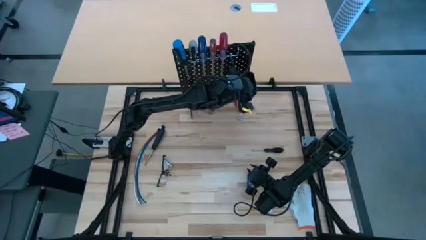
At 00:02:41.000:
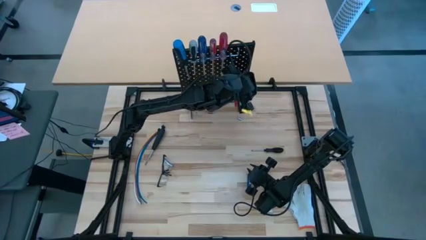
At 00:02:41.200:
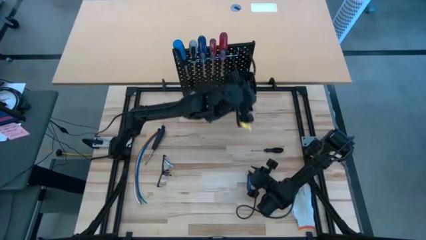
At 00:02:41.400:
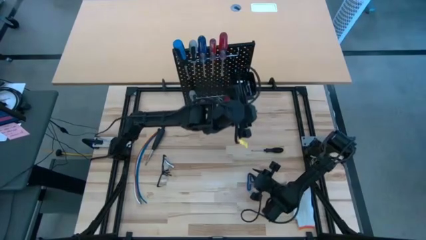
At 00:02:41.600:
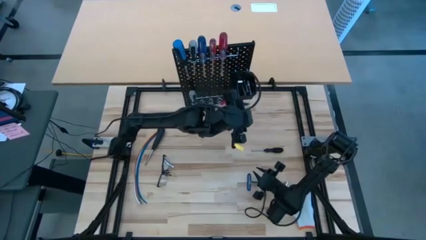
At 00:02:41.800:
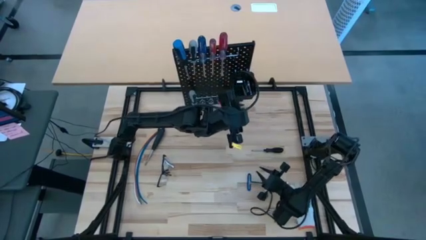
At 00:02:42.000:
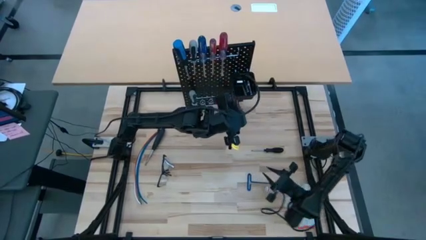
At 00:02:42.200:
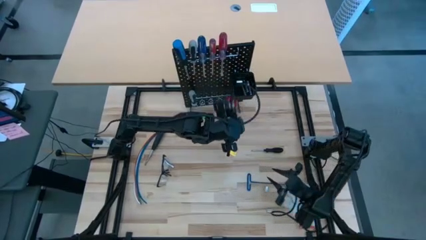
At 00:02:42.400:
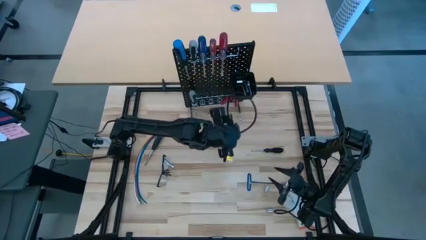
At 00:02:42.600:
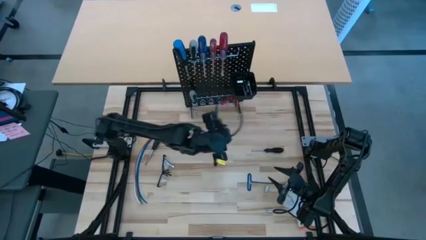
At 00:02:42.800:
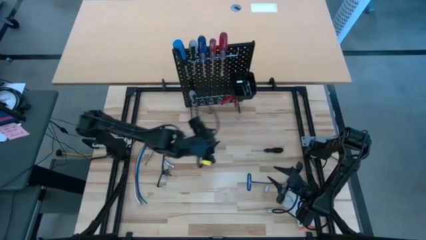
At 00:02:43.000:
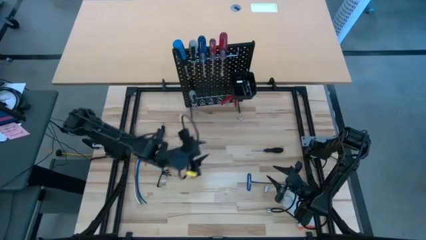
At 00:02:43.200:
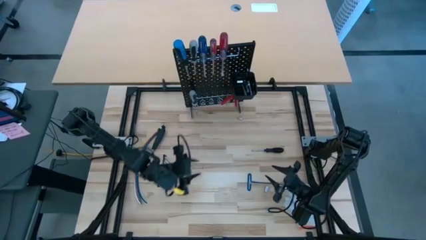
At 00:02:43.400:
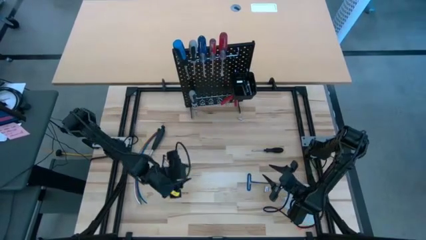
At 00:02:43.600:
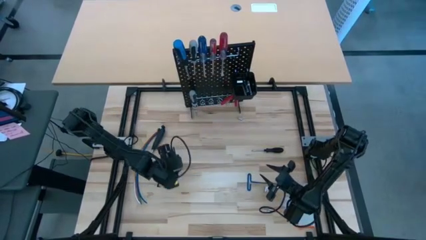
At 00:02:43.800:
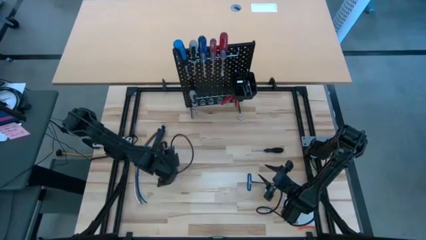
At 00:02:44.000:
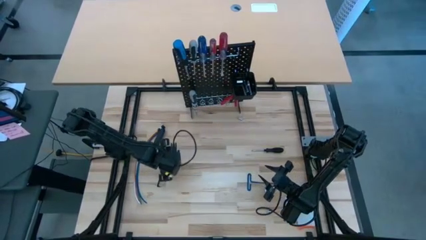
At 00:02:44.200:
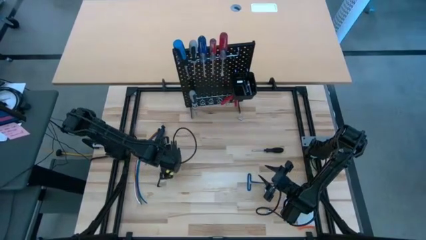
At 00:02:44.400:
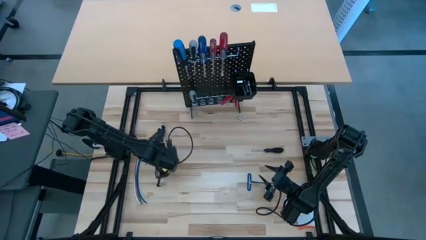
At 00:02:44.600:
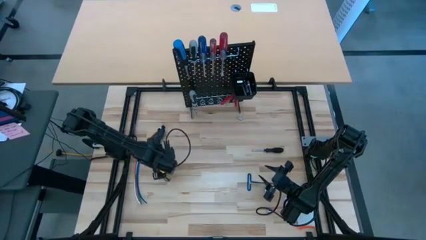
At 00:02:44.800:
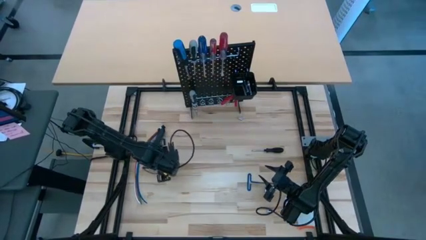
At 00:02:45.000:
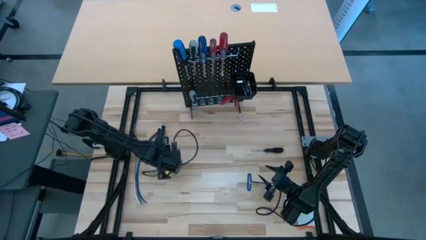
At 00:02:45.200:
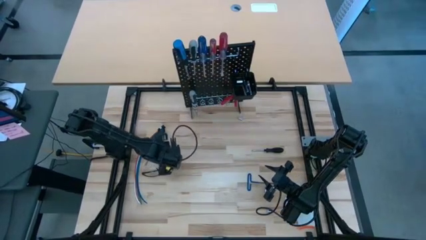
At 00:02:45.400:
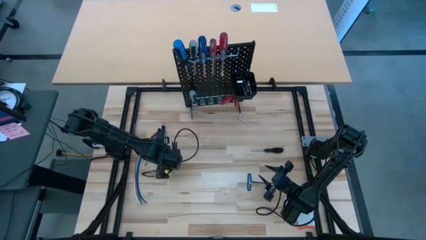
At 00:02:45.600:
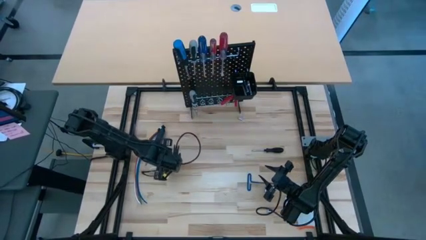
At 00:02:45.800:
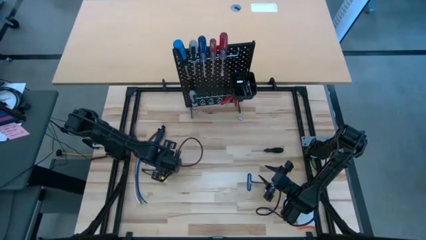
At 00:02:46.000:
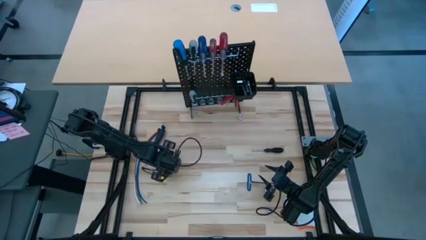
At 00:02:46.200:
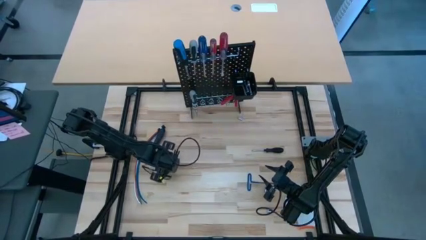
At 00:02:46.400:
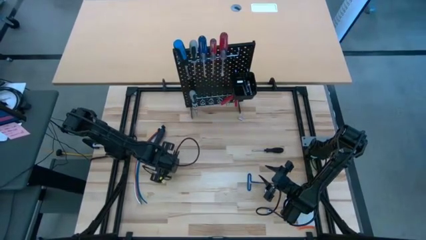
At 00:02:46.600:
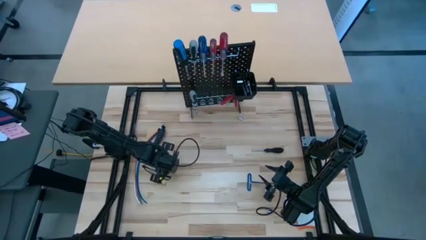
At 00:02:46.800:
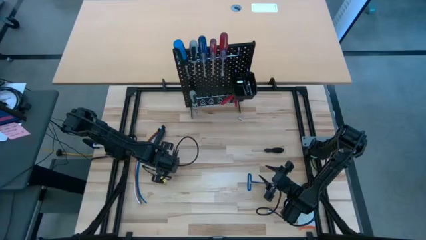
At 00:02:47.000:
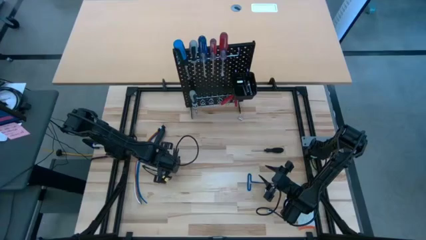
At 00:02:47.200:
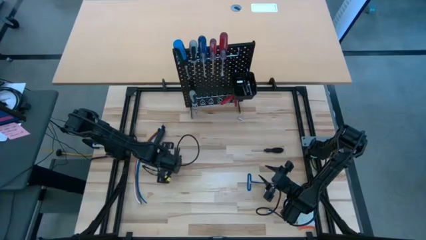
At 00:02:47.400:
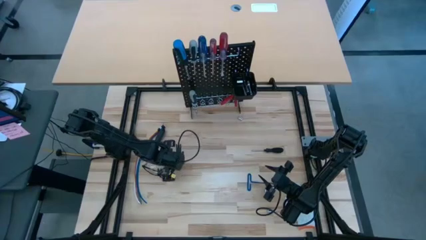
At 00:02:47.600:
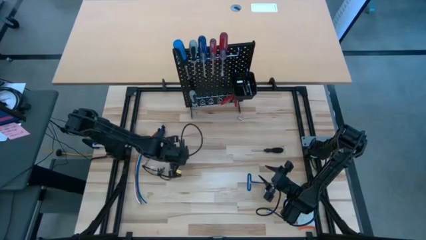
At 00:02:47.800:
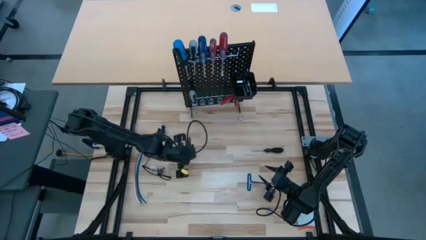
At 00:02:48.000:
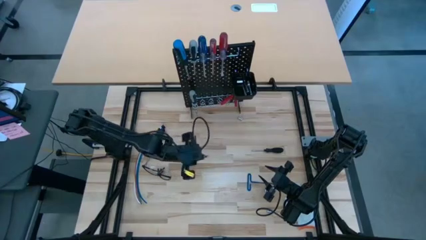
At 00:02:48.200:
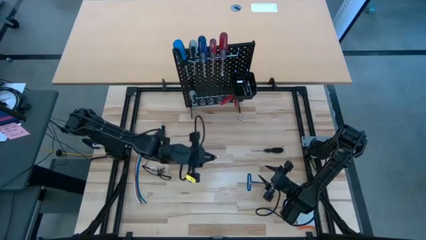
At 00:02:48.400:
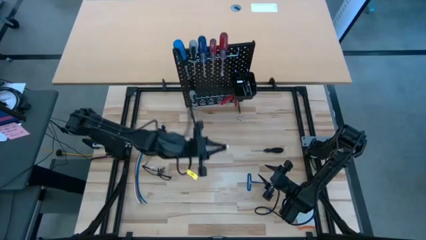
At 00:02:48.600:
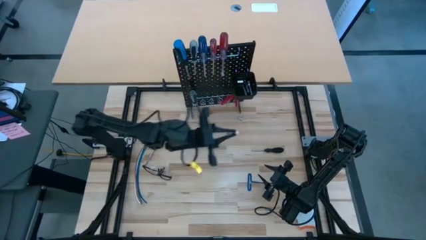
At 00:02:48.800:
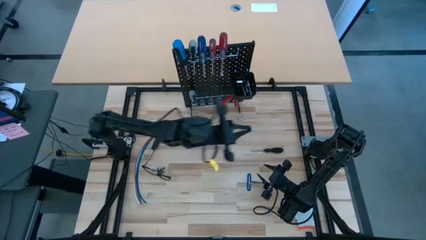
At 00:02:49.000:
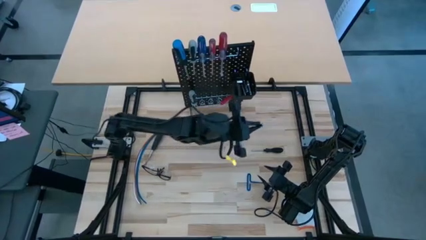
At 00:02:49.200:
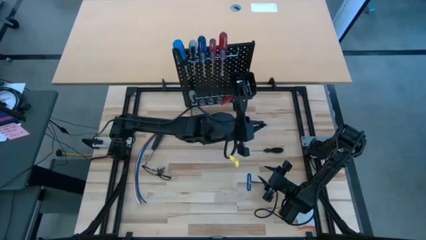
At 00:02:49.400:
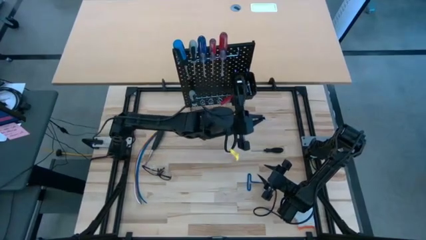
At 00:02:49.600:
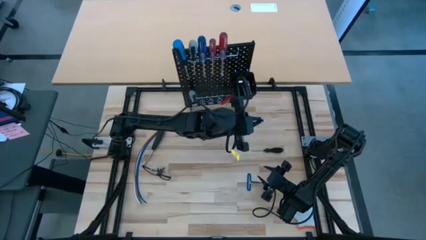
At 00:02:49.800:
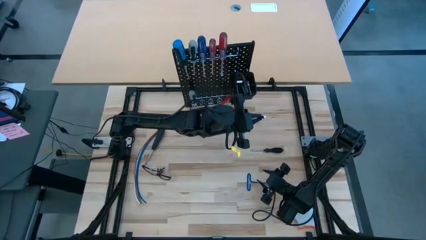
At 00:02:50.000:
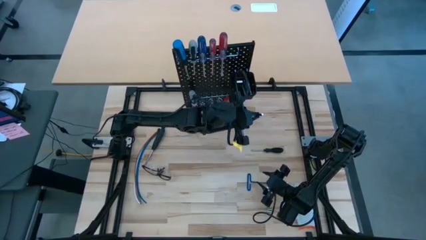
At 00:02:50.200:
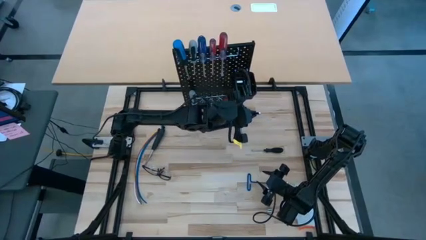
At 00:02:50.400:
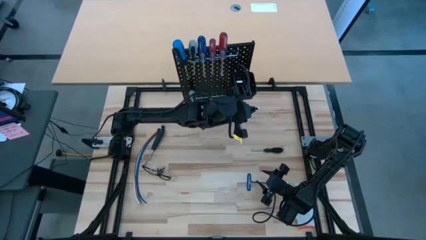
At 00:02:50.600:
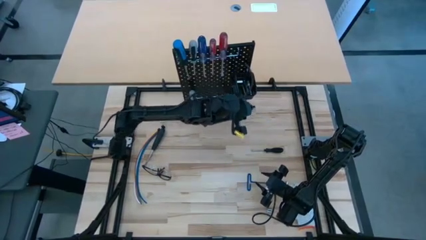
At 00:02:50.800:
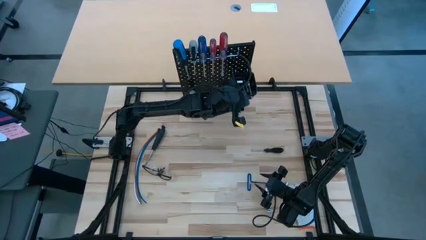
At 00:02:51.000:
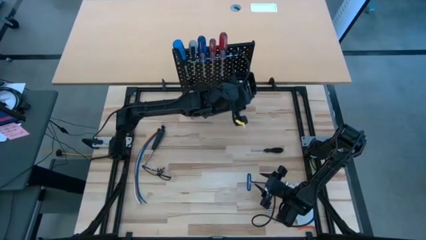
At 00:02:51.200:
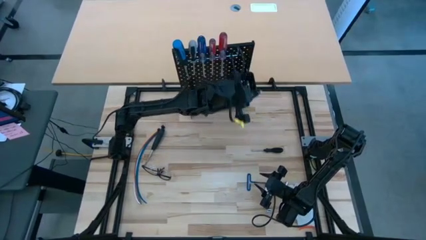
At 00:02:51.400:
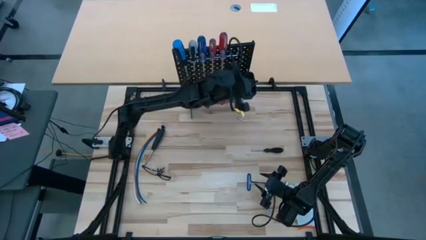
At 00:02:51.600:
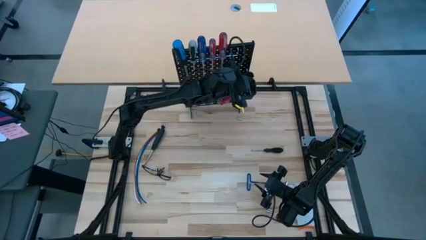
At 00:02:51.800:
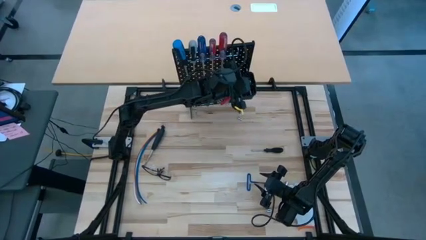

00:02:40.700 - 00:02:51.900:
Task: Hang tools onto peg board
Put the extension bar into the black bin on the pegboard

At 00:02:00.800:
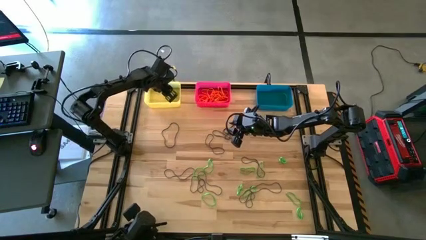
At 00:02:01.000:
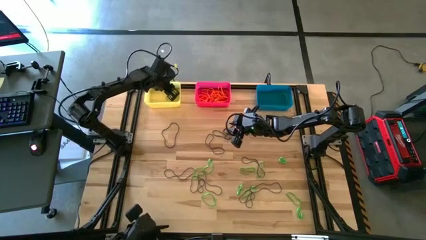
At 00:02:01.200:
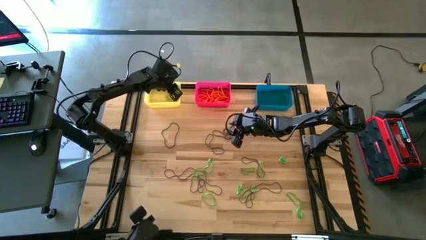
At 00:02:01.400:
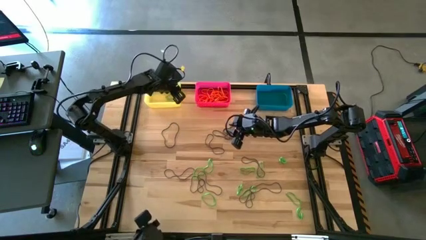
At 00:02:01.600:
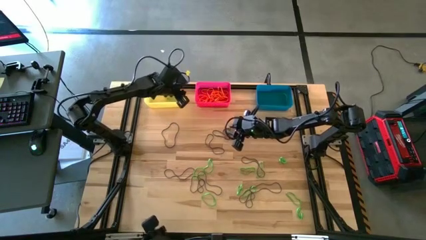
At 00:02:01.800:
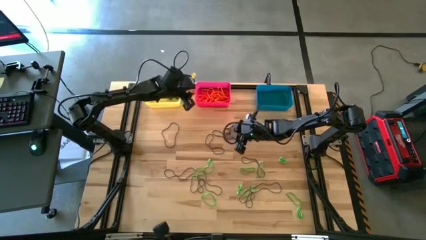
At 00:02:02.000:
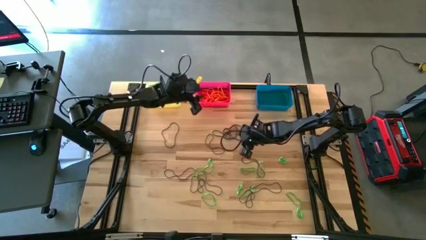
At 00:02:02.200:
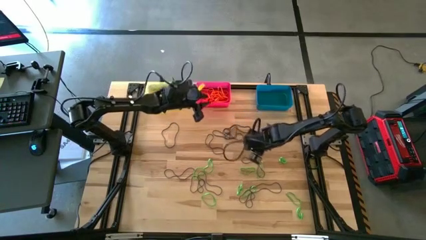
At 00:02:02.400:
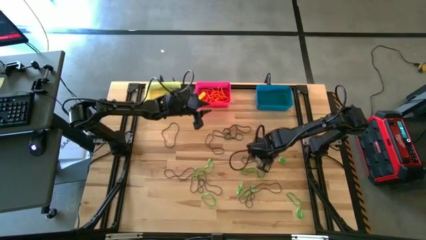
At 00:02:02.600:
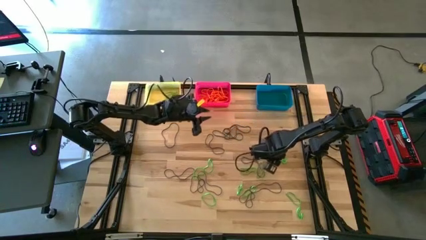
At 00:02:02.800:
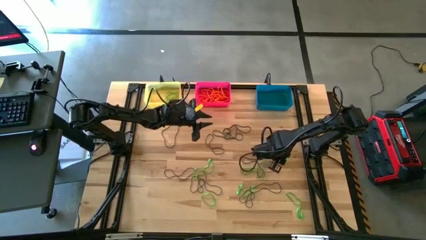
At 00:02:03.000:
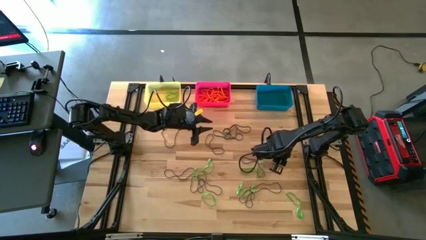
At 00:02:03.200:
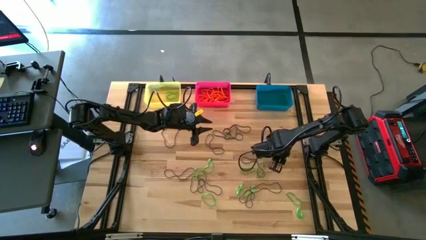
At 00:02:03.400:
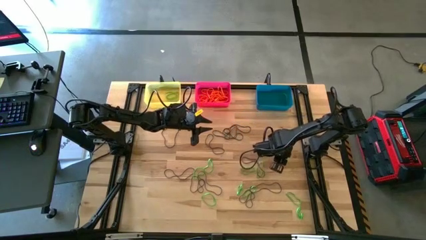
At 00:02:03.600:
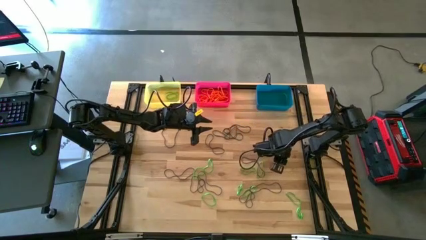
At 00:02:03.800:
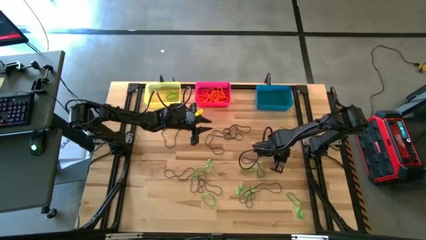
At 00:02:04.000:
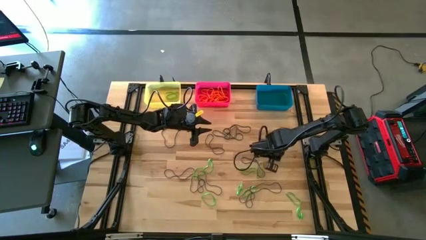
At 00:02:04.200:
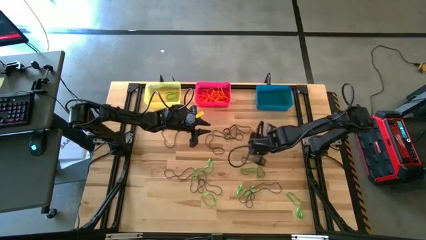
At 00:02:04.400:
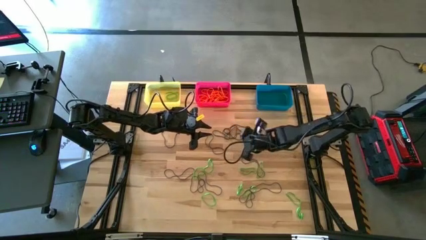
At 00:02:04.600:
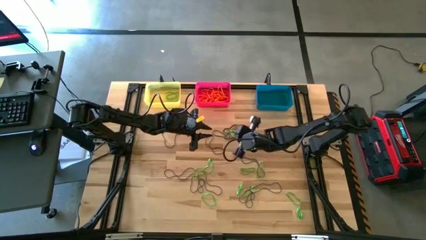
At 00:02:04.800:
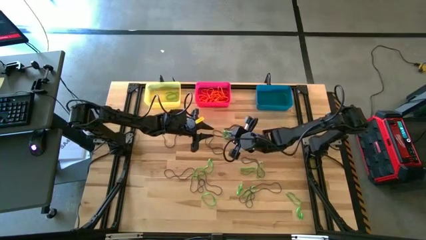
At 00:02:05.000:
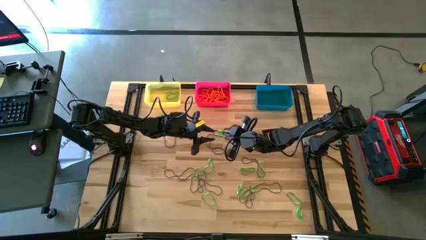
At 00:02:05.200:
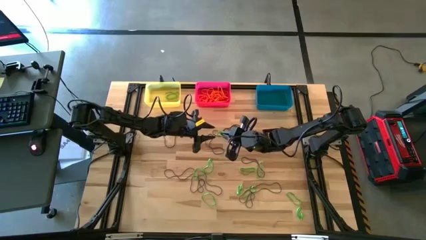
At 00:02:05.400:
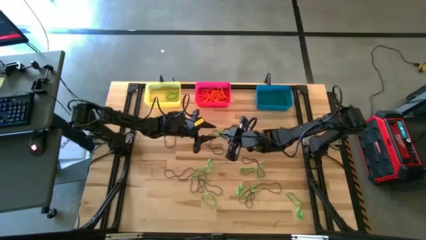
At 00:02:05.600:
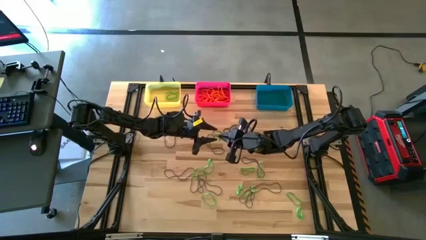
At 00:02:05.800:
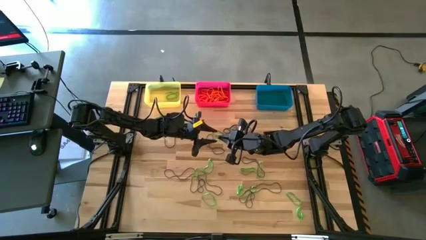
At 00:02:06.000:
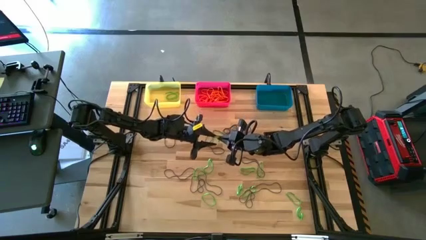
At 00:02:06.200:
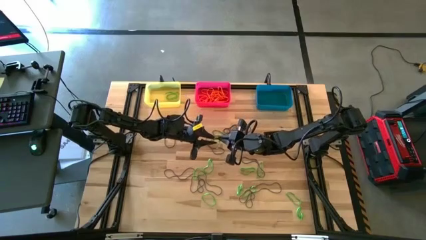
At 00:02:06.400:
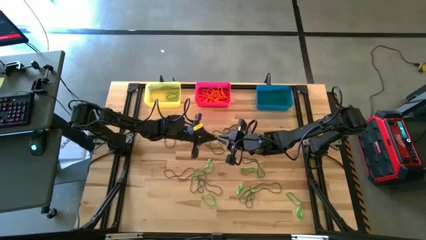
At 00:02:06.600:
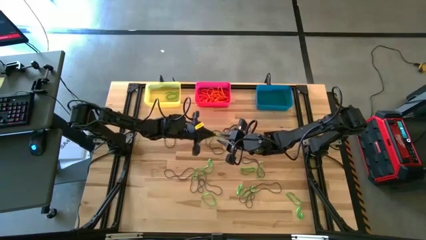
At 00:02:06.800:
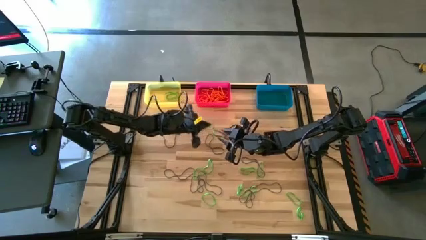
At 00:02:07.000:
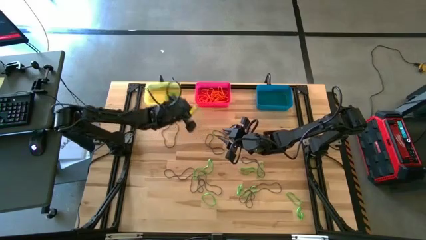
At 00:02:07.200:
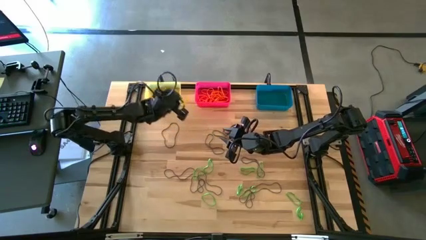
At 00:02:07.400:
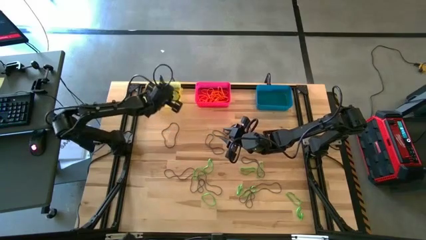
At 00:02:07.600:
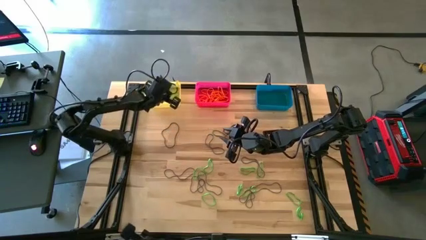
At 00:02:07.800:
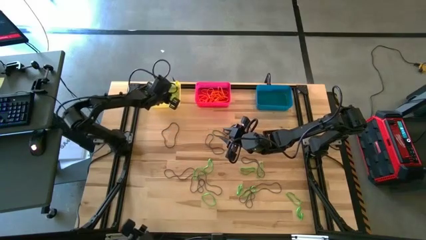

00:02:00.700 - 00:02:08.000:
Task: Sort rubber bands into baskets
Put the green rubber band into the yellow bin
